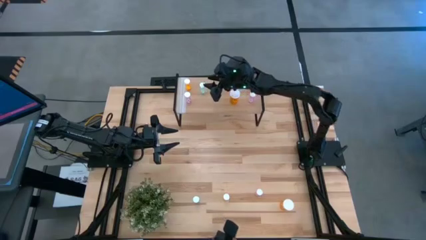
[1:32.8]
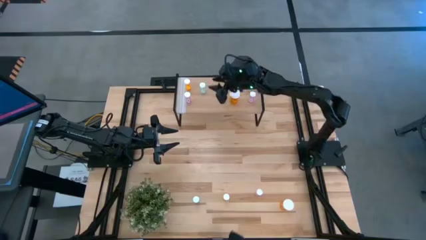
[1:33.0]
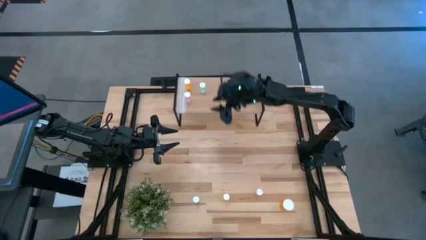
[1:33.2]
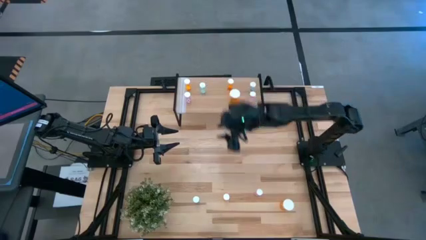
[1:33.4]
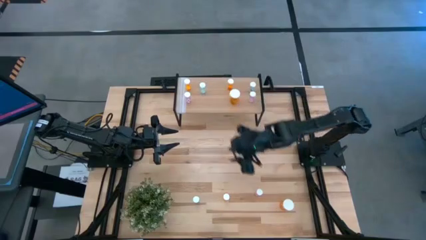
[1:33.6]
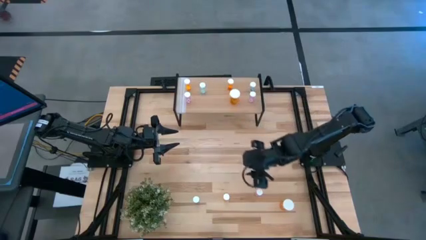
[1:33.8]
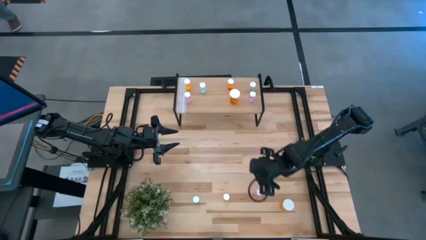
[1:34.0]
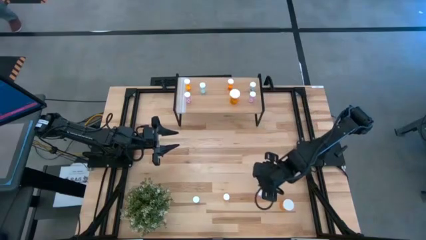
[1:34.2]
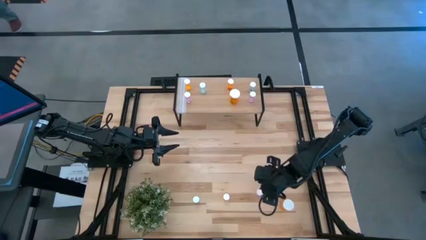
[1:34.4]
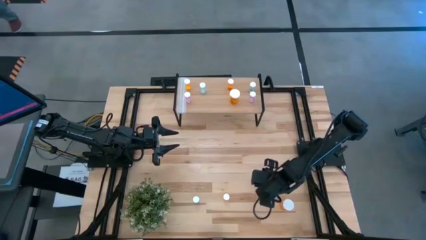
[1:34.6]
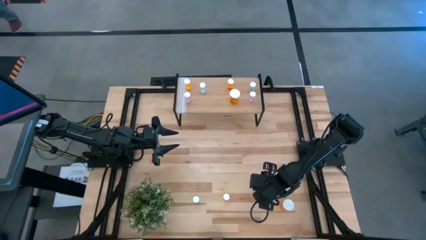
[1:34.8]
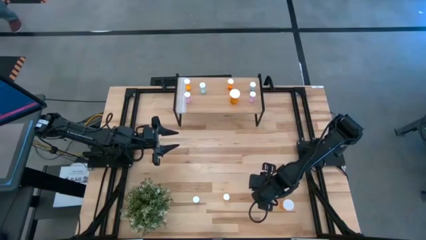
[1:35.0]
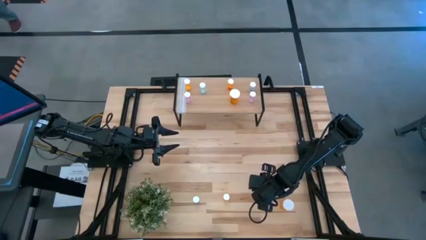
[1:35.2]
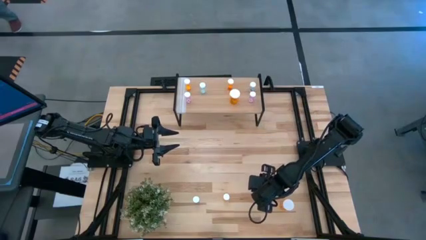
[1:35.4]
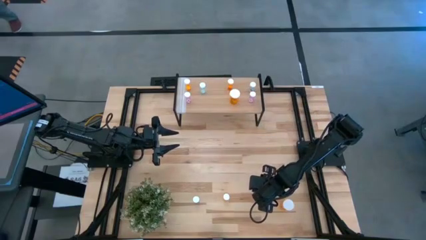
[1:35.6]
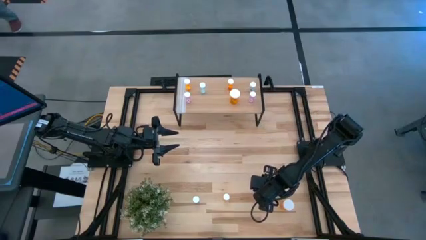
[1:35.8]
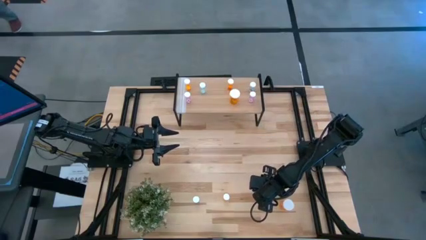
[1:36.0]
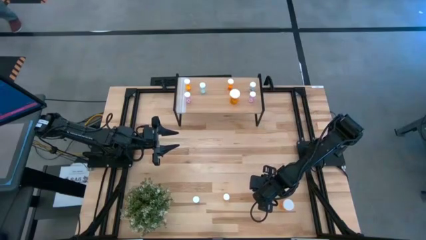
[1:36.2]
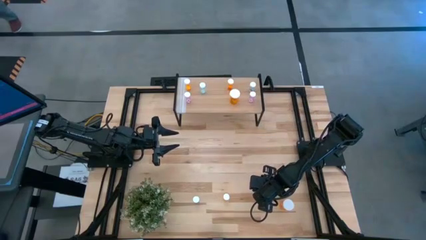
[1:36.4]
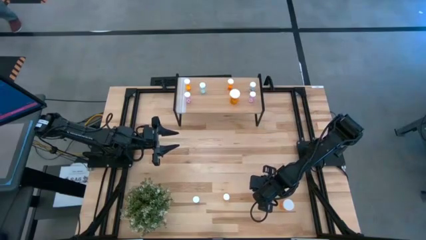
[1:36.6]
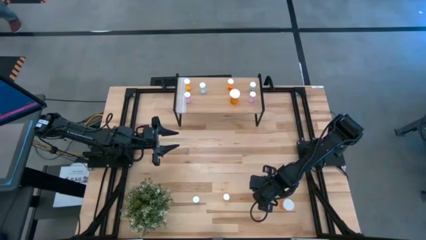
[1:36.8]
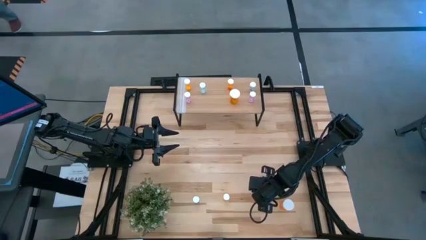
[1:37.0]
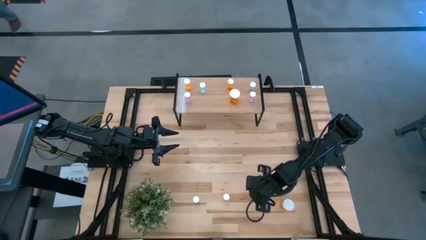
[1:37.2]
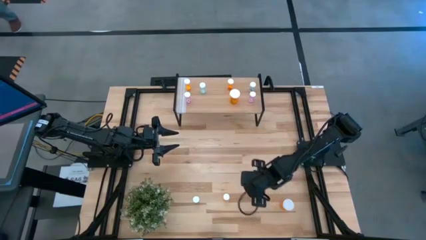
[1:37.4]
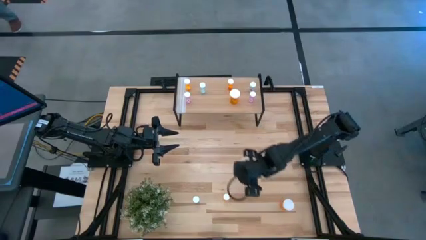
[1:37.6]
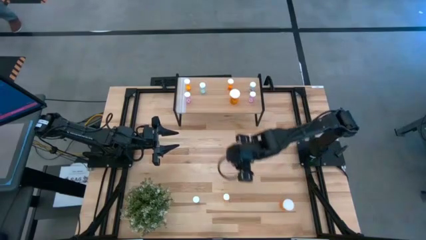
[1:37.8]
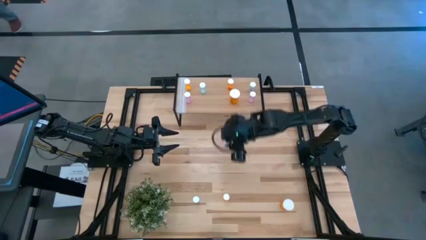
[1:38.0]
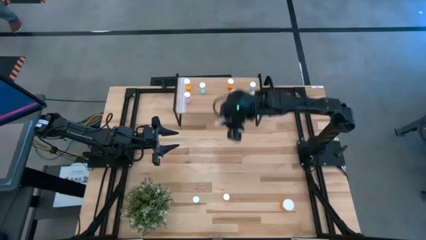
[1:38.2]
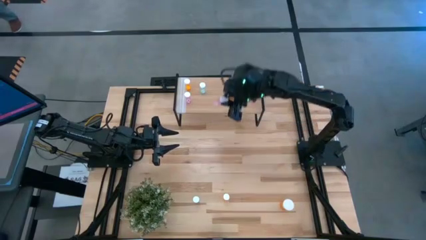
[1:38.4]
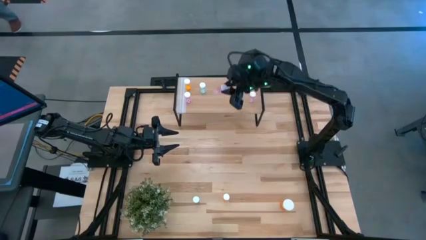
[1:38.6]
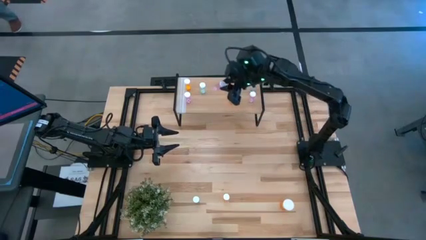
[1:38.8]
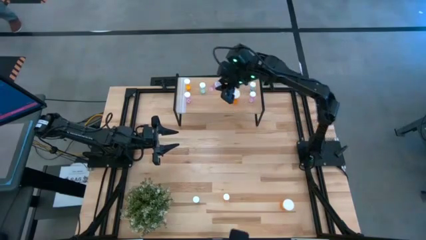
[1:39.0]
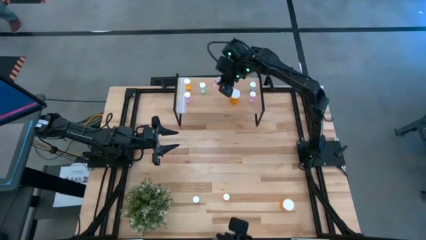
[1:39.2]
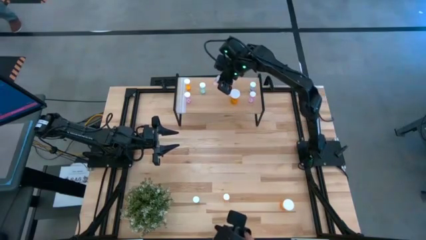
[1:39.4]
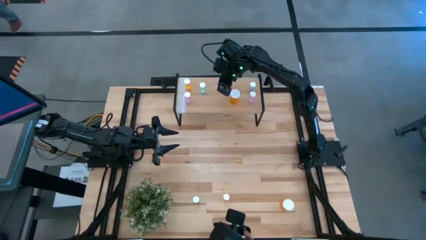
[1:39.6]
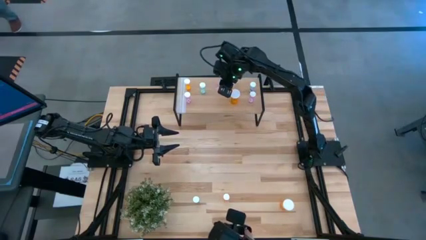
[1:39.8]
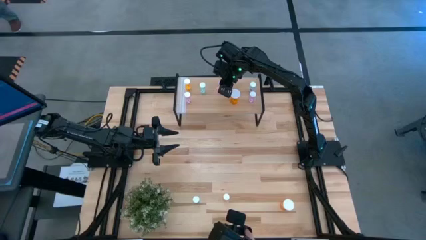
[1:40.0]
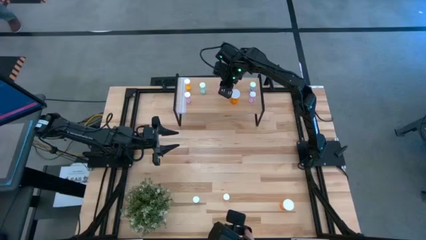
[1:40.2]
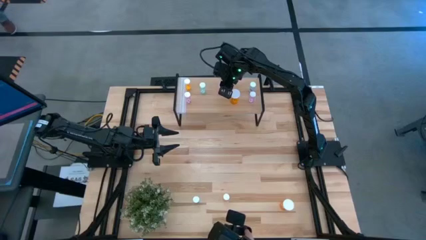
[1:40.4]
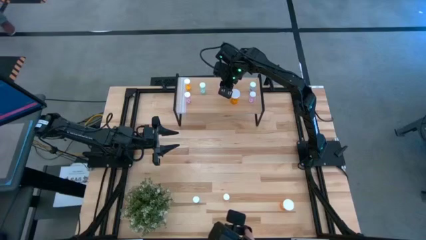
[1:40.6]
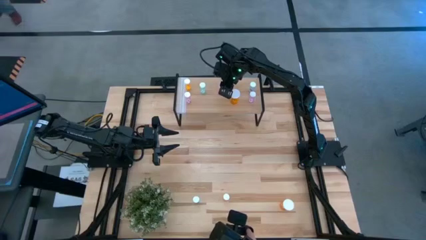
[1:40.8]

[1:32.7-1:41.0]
Task: Pick and place medicine bottles onto shelf by color
Put the pink pill bottle on the shelf

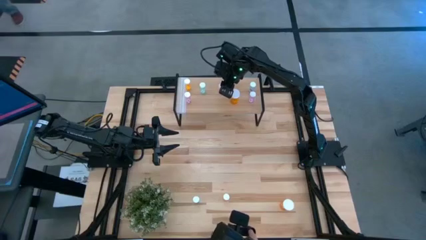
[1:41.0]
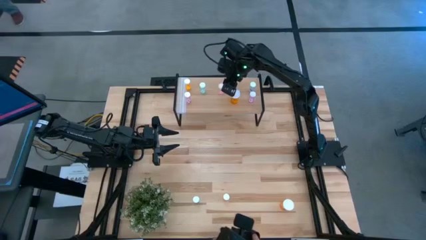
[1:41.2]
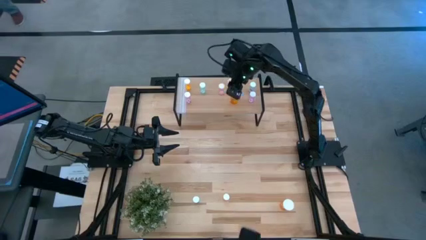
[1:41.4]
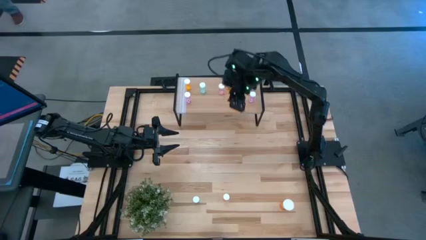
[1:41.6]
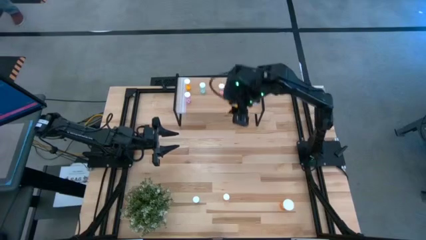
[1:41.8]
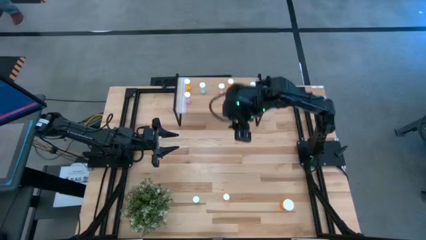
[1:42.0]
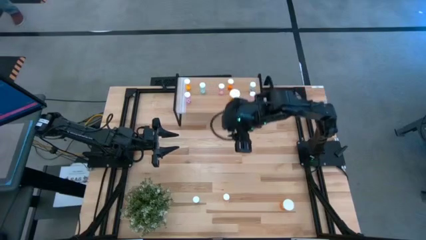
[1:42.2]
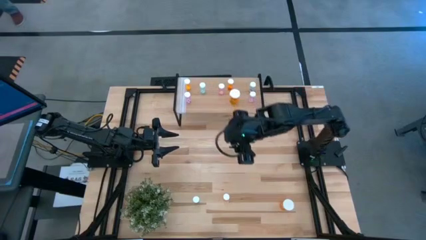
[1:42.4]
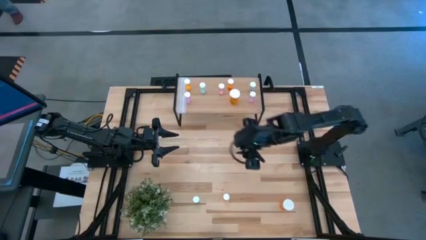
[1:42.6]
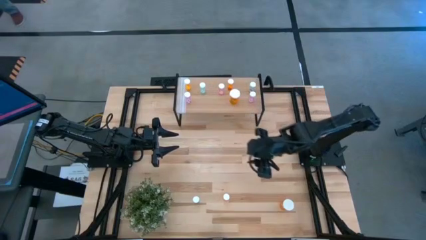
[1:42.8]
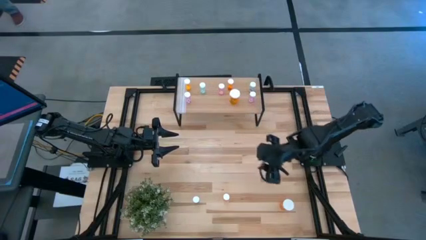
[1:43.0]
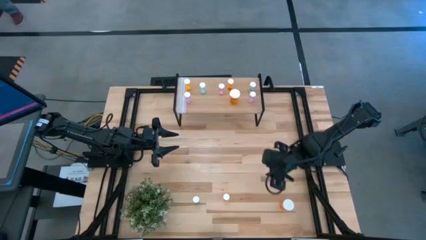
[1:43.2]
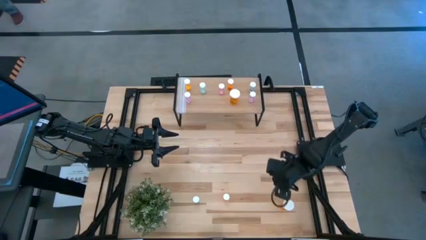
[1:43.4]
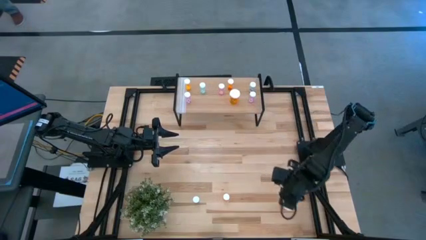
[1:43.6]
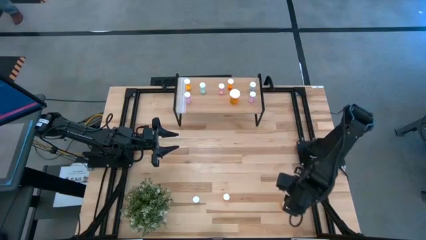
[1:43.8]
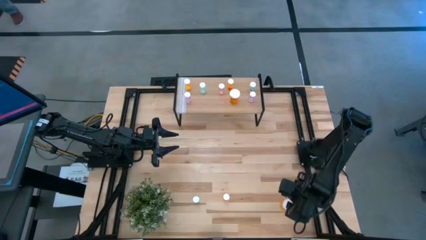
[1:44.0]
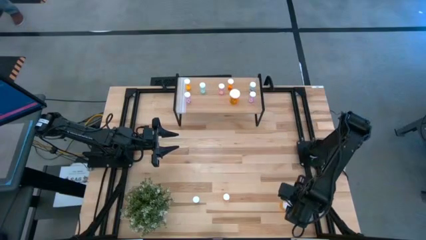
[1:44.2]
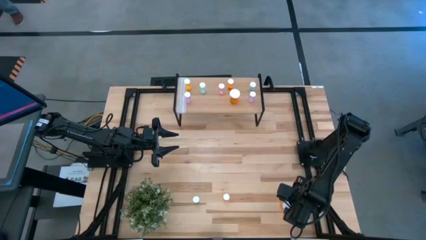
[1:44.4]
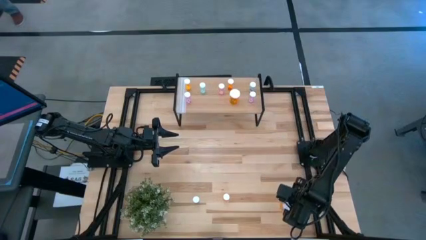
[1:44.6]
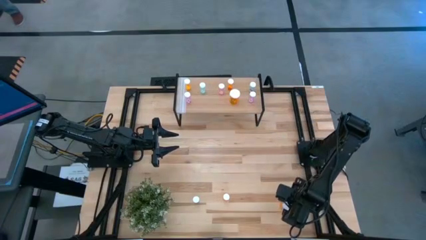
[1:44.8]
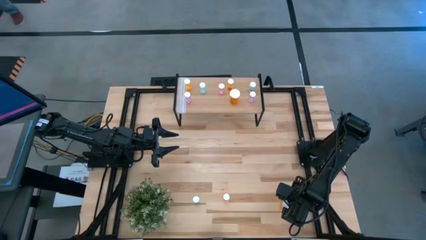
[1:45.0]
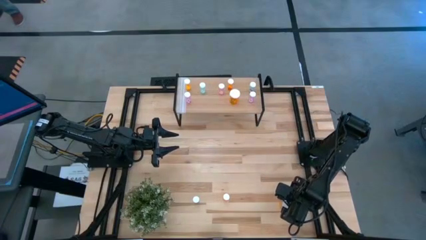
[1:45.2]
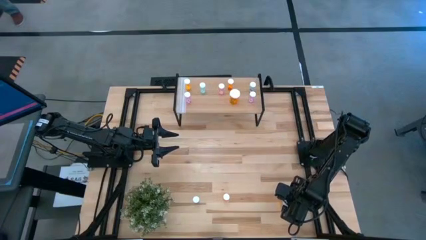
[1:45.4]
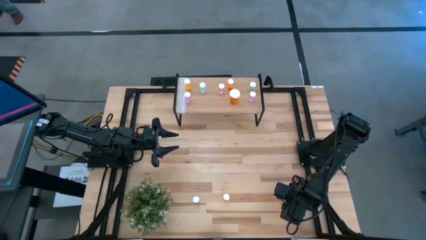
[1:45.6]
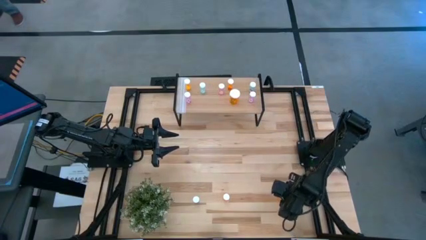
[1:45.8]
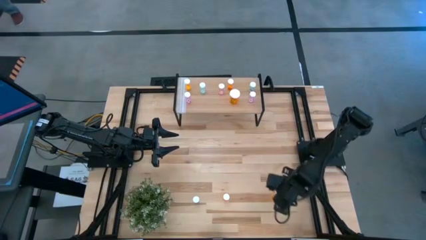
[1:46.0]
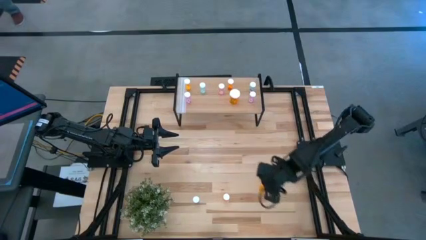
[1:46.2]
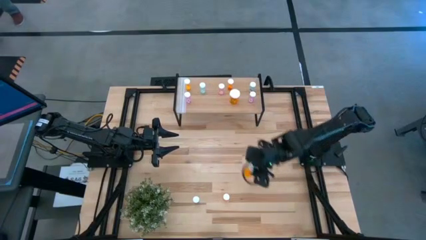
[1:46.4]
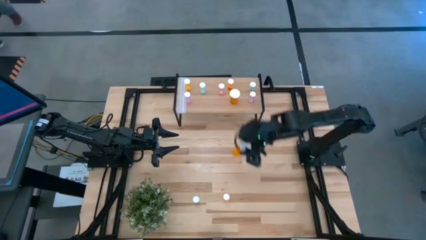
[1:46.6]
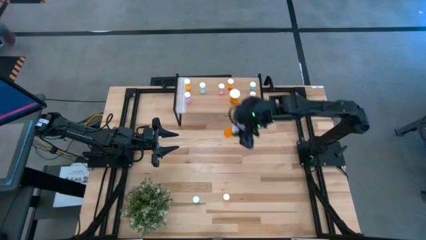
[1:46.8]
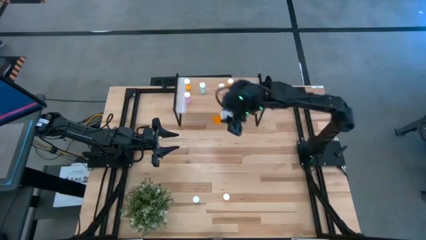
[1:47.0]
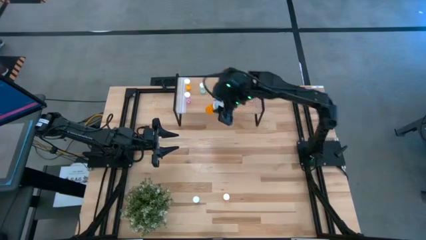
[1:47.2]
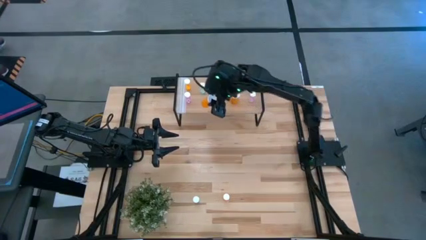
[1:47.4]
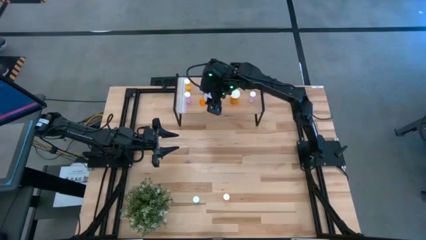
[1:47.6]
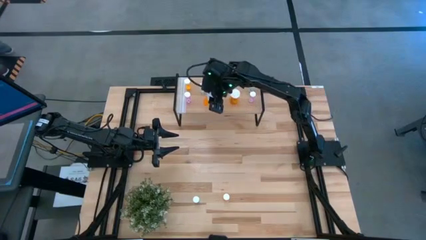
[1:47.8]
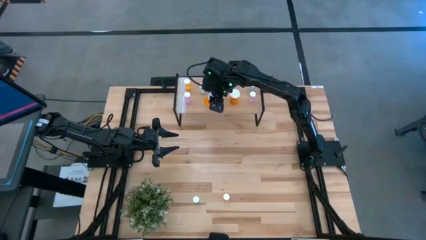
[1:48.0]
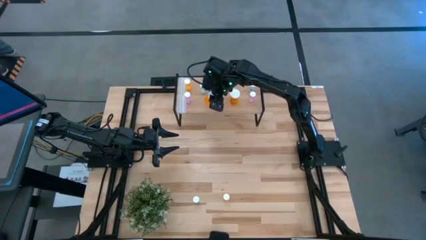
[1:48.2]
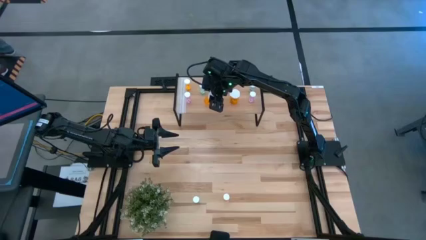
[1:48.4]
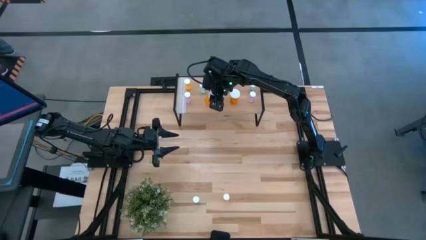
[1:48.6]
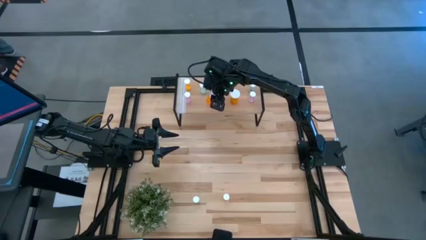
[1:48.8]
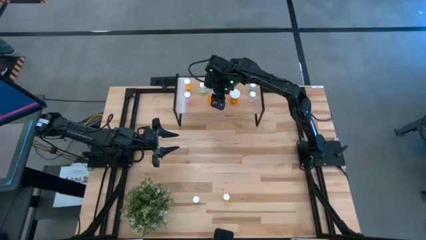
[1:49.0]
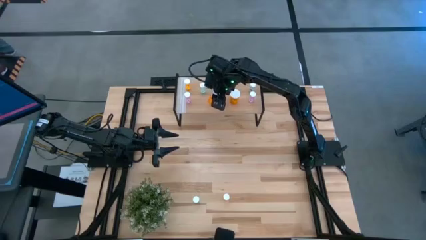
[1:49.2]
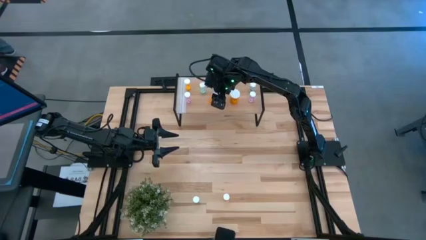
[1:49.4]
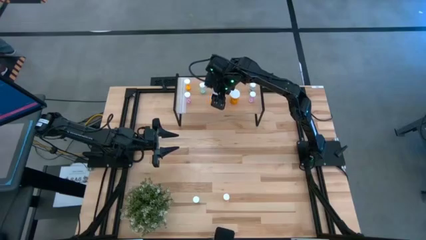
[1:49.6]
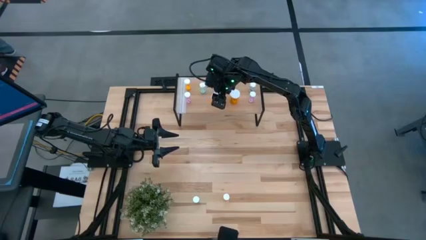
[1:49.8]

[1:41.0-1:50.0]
Put the orange pill bottle on the shelf
